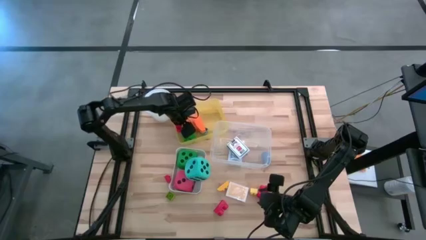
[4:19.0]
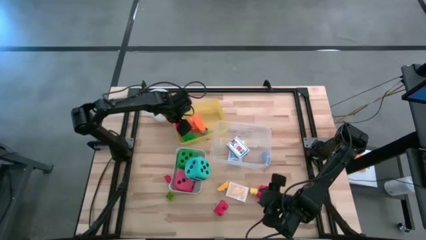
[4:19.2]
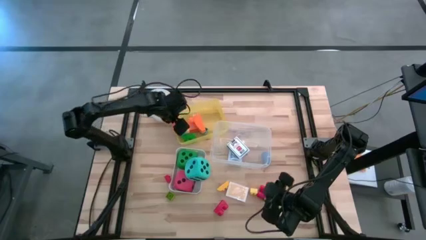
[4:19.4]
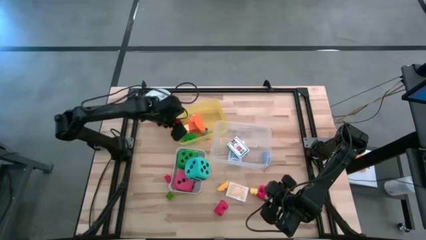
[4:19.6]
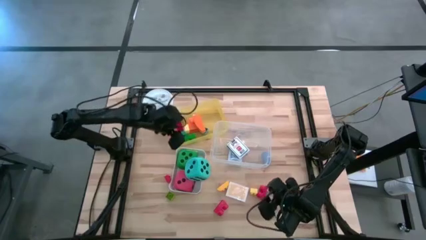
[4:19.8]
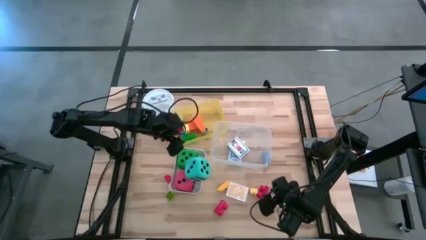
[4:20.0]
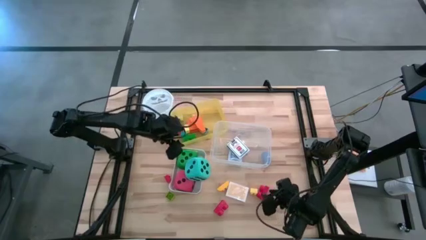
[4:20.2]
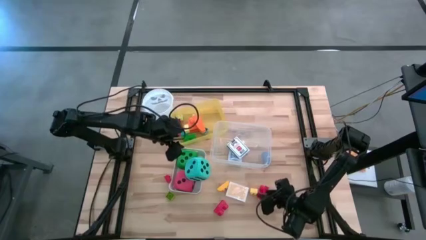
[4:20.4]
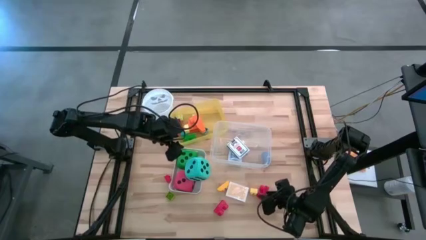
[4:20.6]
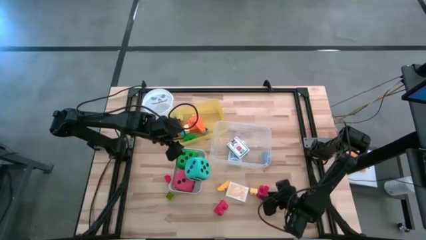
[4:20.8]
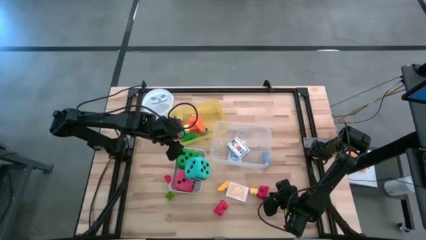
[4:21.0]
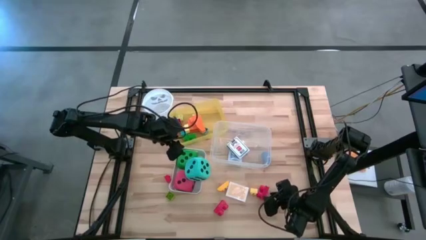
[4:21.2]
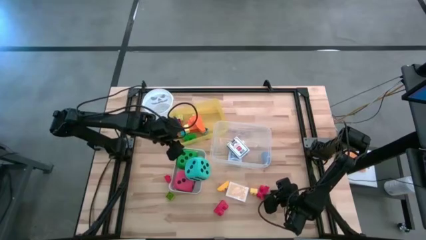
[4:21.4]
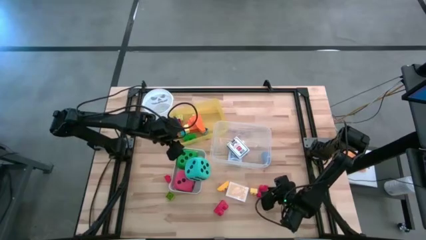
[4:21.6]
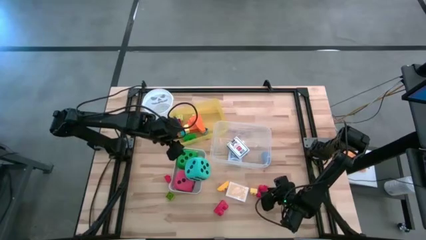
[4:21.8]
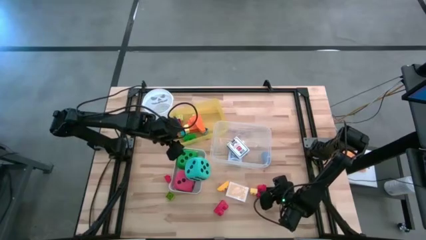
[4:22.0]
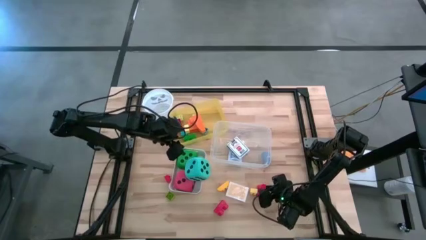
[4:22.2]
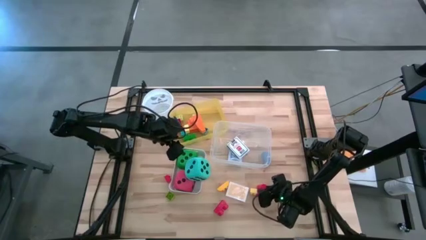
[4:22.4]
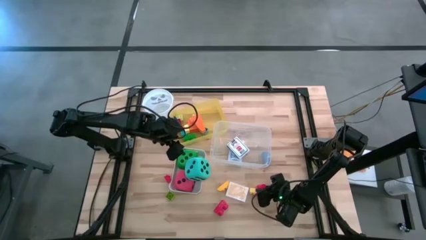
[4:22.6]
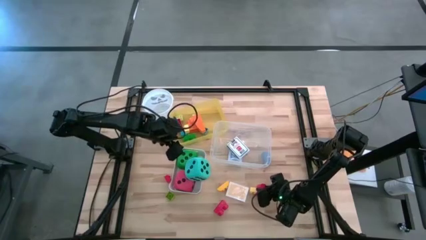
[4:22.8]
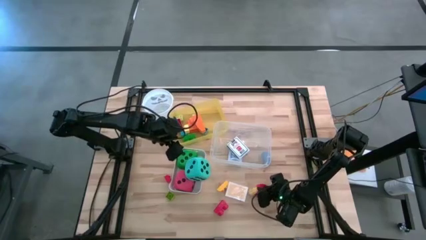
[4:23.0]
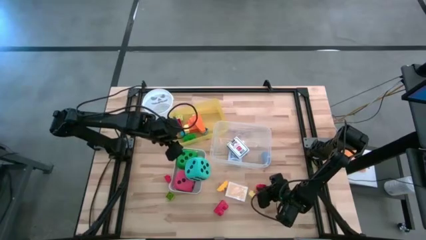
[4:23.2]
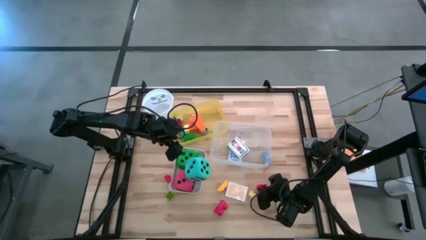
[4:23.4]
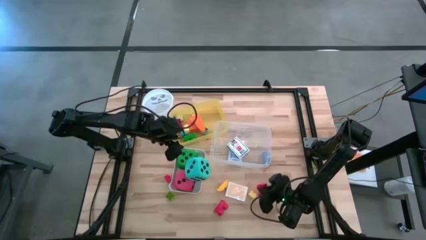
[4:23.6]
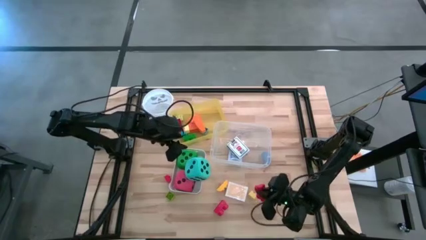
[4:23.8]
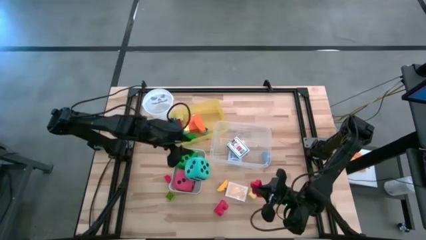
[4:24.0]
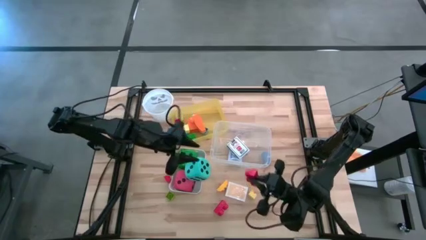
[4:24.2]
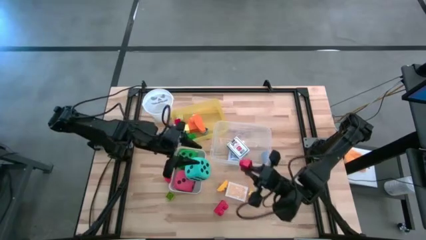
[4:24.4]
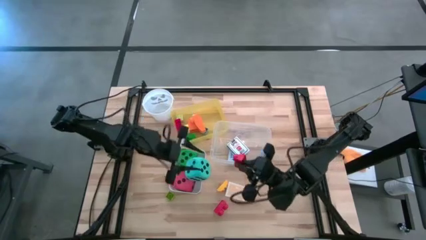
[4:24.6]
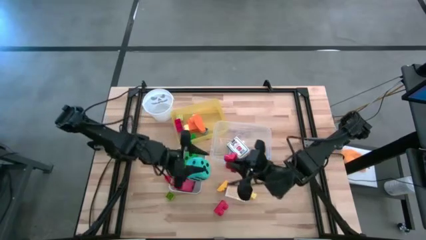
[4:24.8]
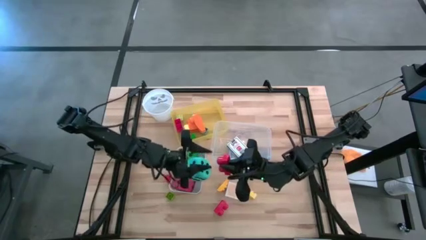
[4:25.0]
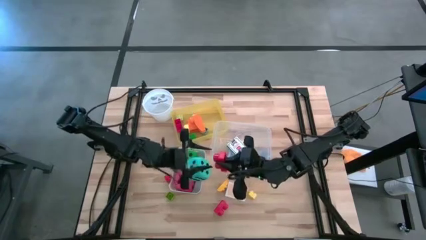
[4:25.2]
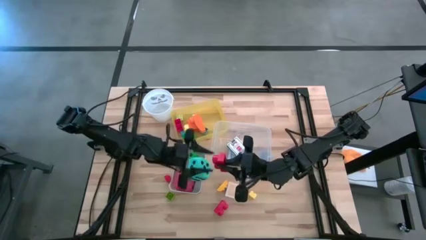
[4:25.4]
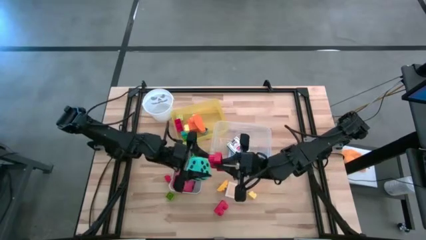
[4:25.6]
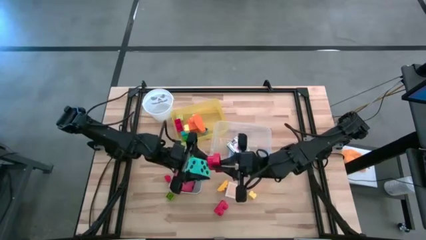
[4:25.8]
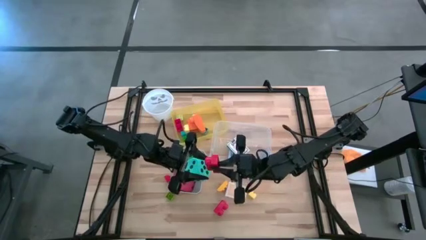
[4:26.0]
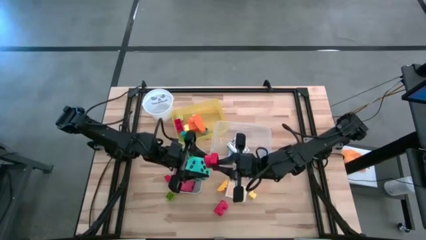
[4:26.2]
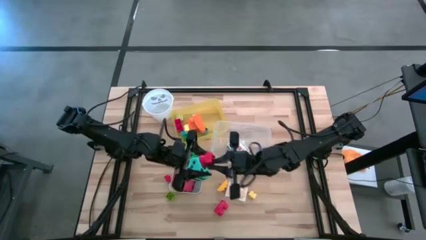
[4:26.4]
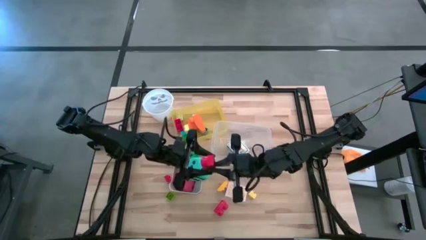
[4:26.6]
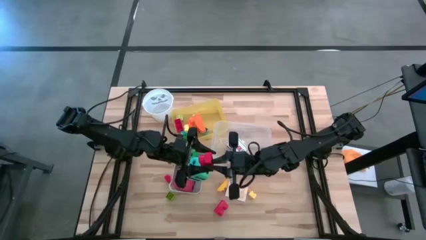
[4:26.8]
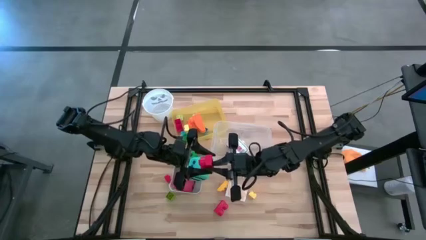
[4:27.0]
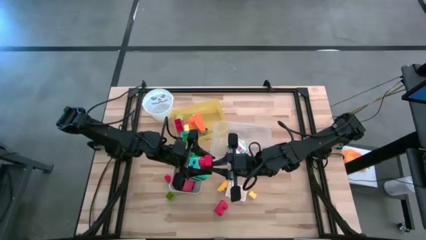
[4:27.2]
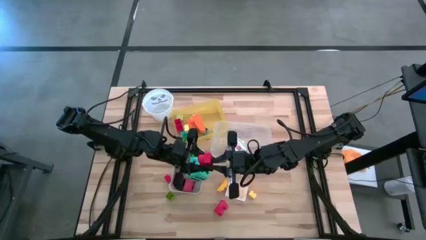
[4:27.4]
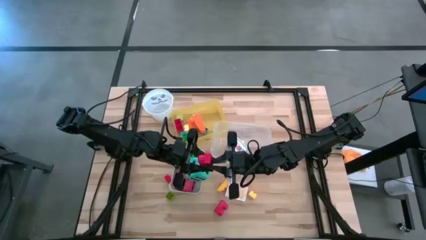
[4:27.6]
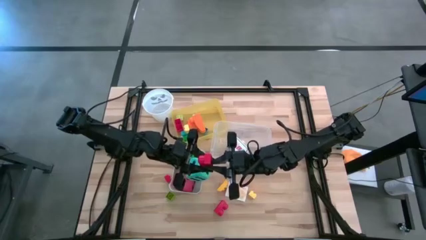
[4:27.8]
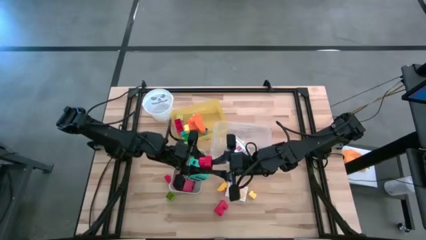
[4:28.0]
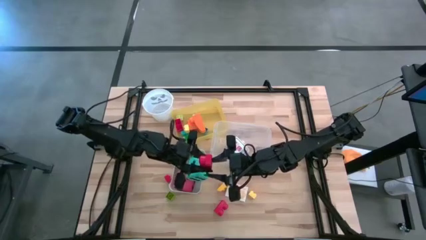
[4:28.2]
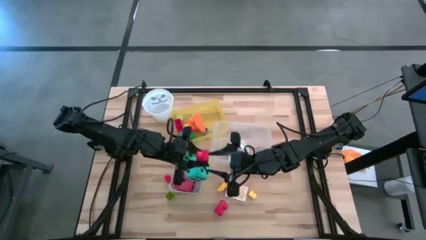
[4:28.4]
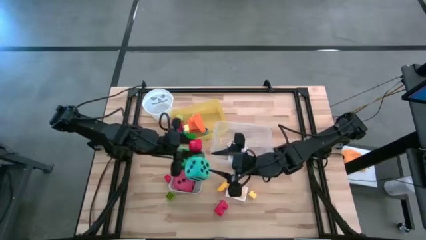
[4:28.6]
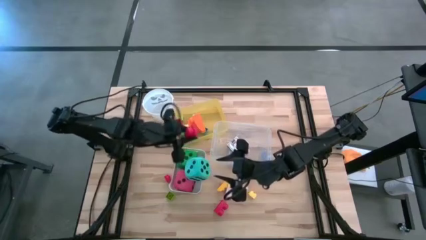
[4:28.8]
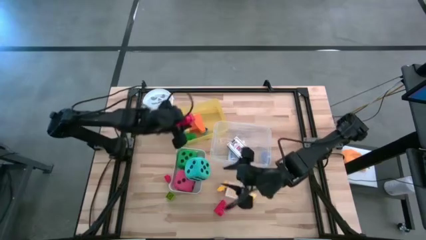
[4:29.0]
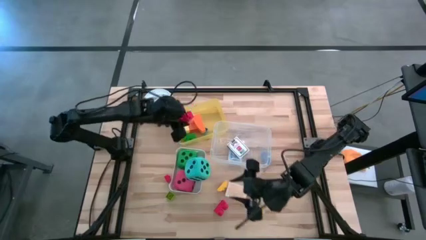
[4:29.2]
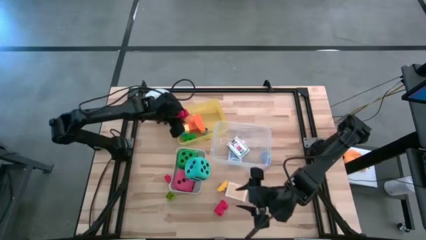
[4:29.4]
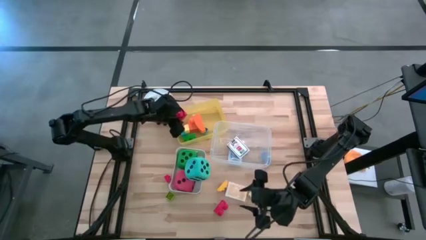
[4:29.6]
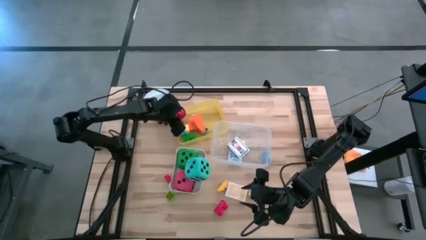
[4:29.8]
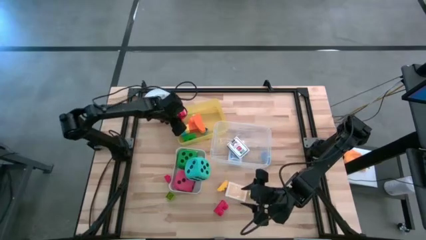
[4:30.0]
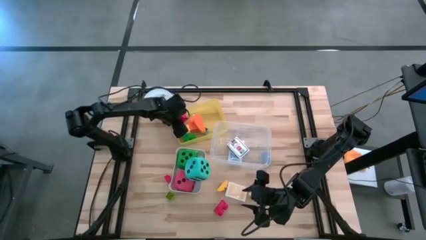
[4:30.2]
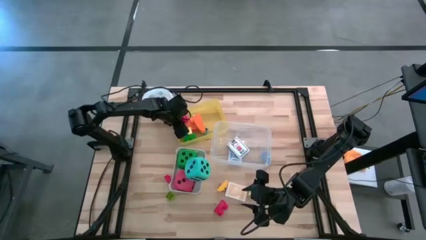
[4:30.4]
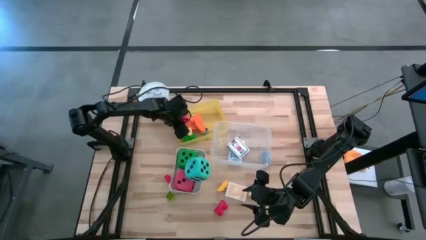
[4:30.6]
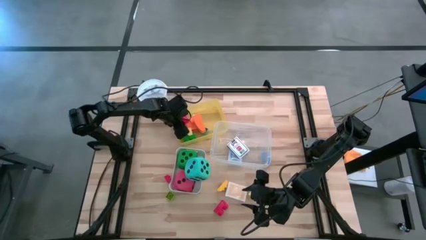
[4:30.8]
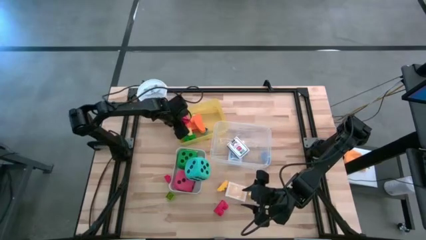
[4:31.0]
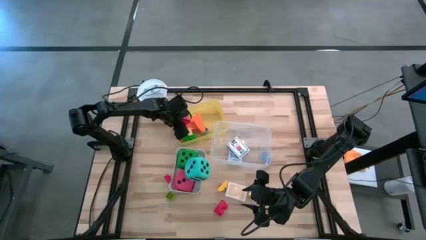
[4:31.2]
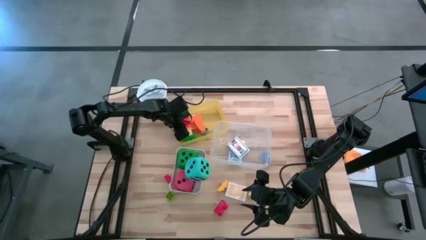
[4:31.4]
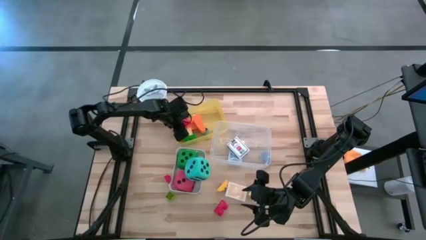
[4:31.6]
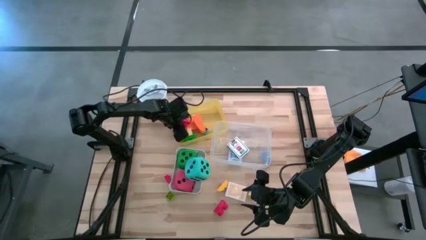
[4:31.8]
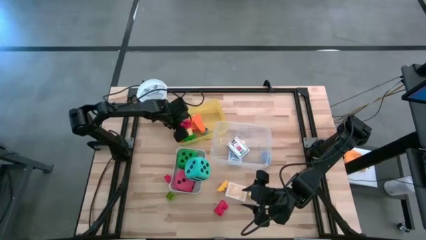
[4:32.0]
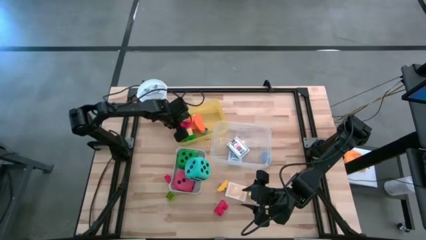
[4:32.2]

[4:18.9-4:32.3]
Task: Pick & Place Toys
Put the red game piece into the yellow bin

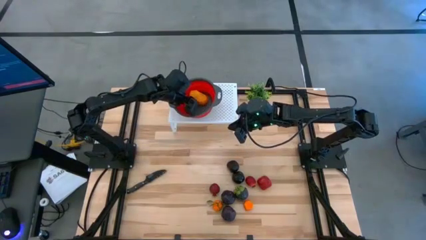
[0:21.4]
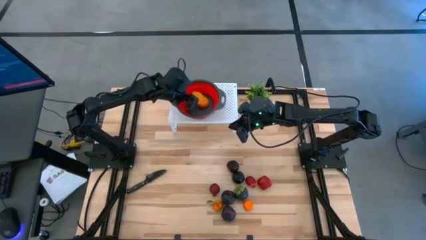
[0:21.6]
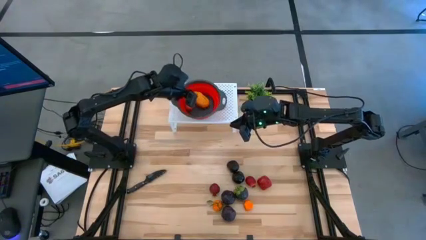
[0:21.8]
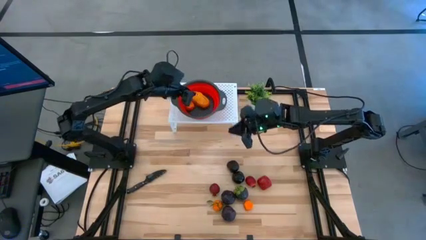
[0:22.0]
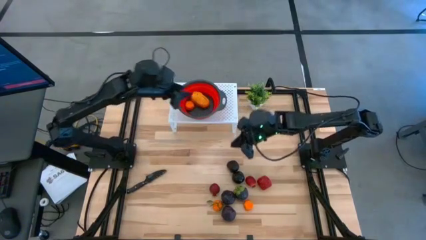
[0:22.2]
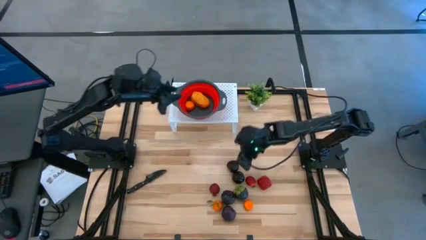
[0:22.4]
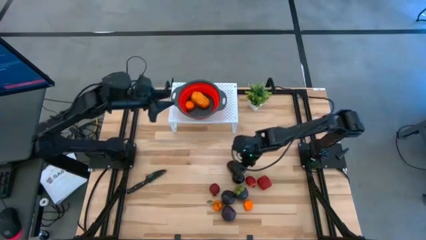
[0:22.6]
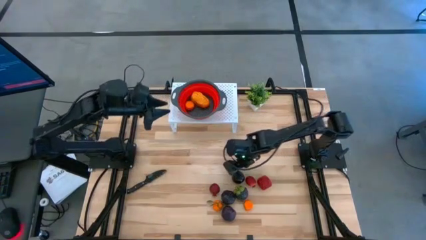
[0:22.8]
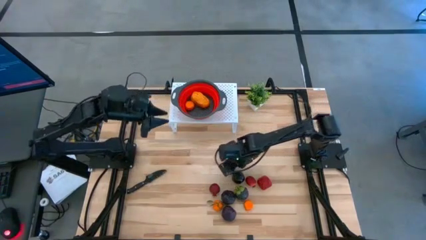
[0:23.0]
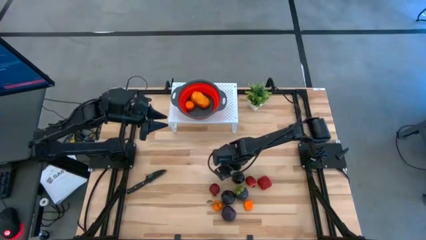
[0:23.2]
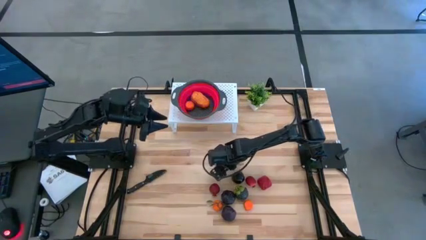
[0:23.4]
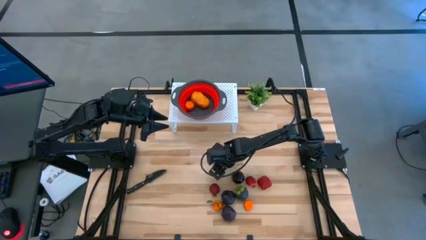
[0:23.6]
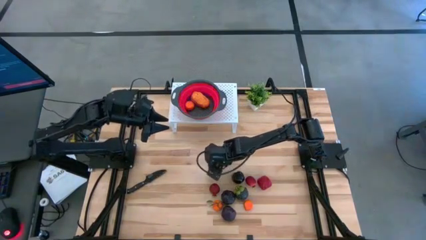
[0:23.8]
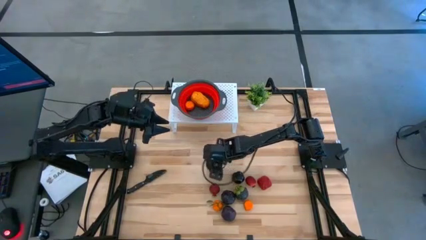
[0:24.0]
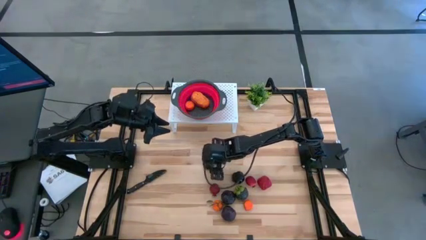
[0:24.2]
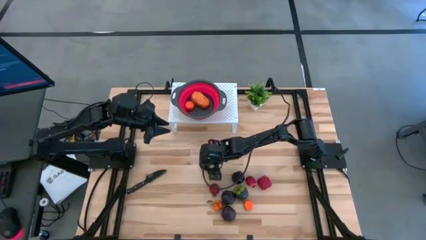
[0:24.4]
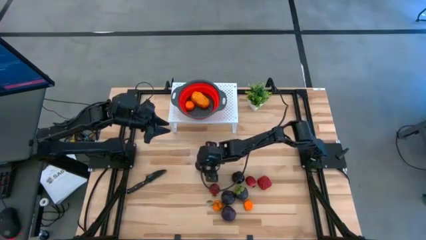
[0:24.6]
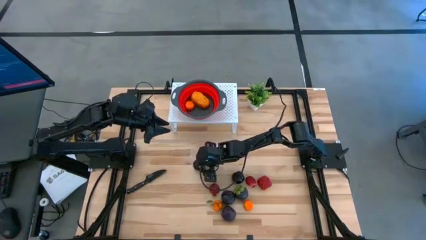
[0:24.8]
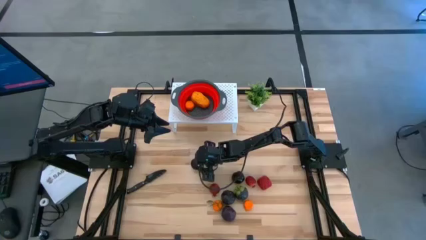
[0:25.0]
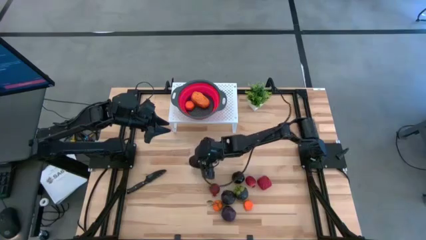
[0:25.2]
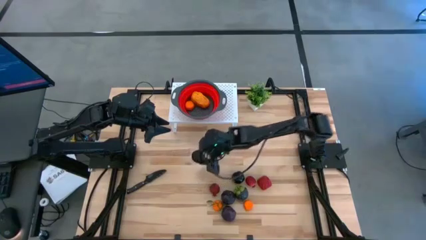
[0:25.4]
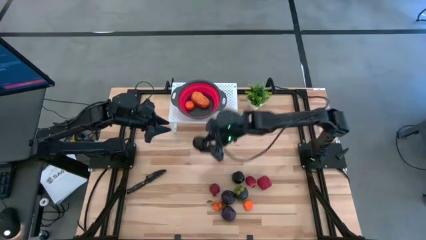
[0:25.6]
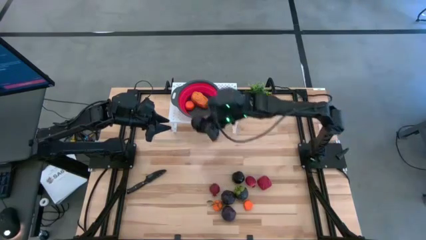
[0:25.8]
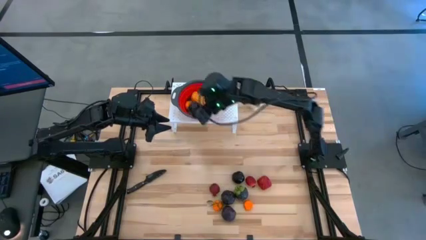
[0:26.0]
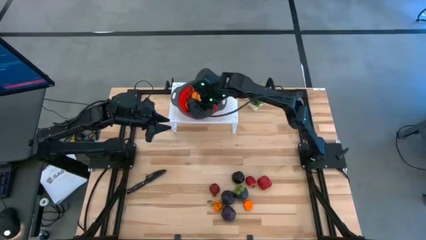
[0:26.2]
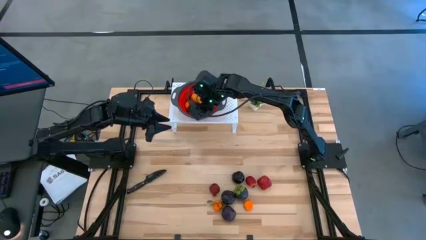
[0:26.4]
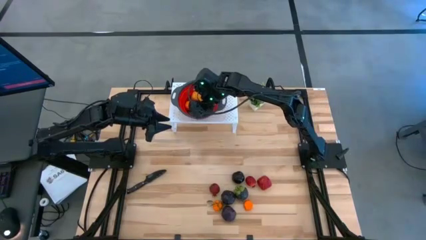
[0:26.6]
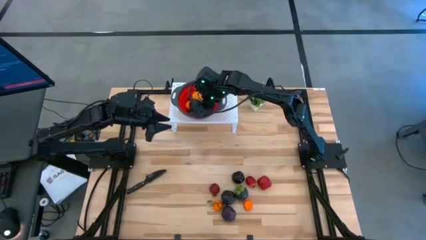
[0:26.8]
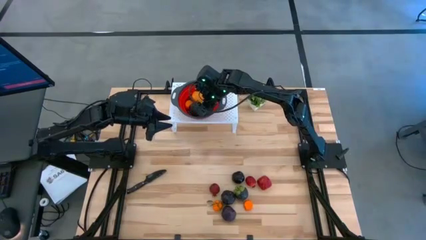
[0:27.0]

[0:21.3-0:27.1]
Task: Pick & Place Fruit
Put the purple plum into the red strainer bowl on the shelf
